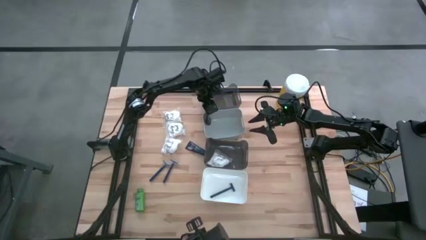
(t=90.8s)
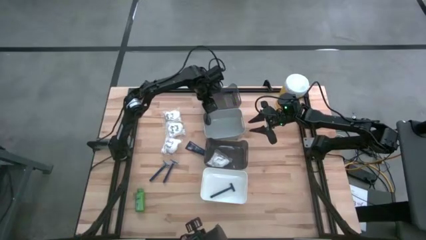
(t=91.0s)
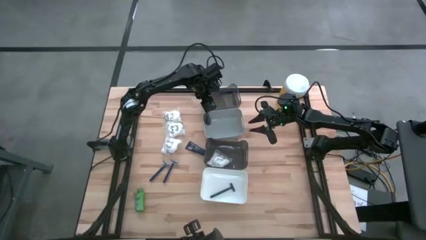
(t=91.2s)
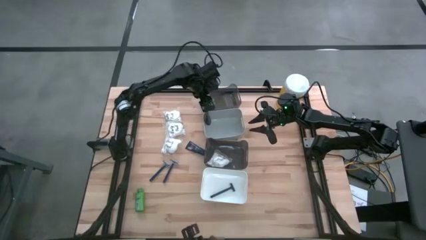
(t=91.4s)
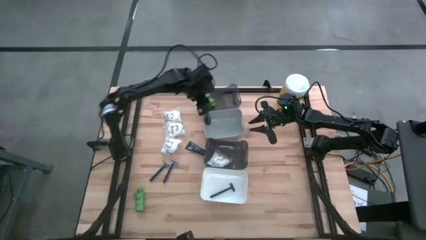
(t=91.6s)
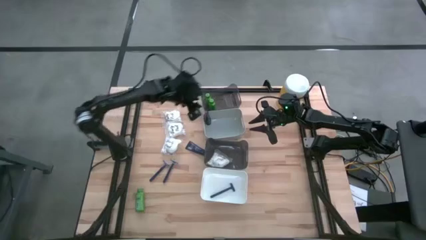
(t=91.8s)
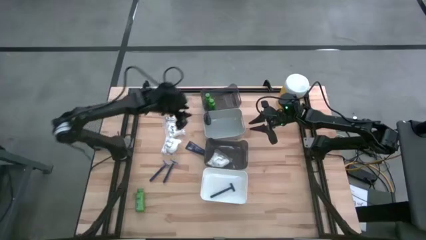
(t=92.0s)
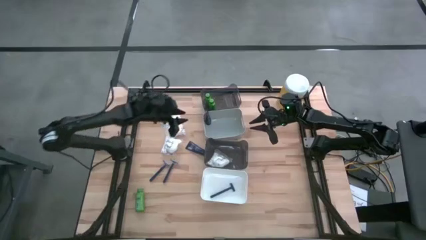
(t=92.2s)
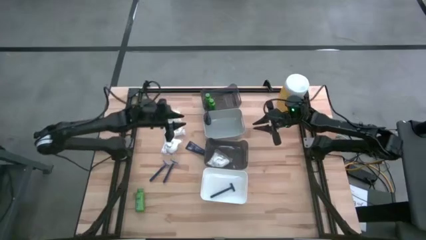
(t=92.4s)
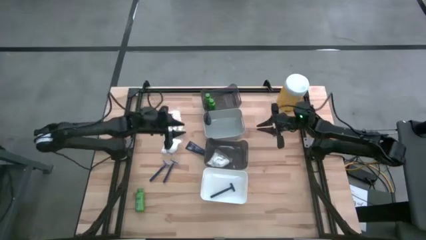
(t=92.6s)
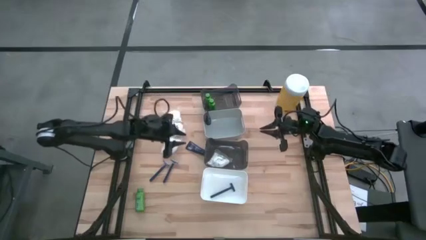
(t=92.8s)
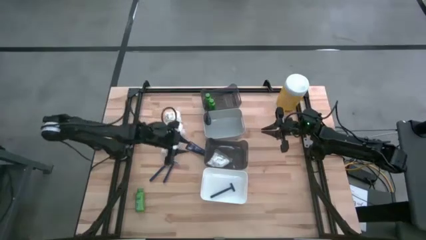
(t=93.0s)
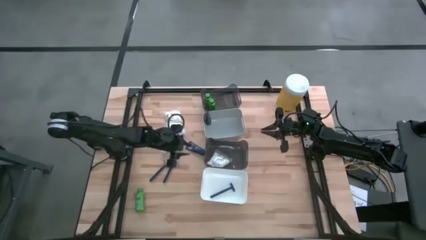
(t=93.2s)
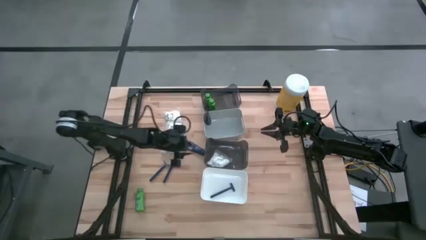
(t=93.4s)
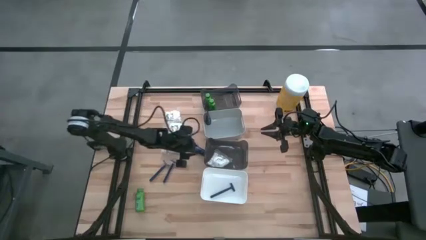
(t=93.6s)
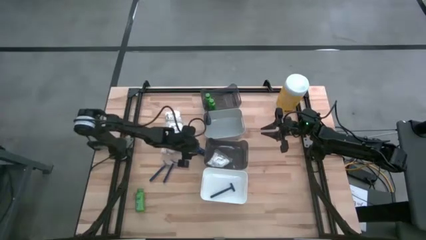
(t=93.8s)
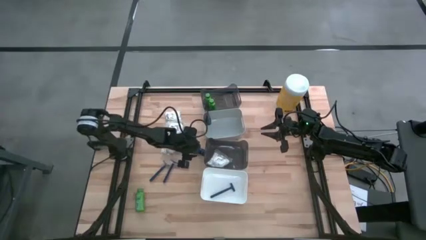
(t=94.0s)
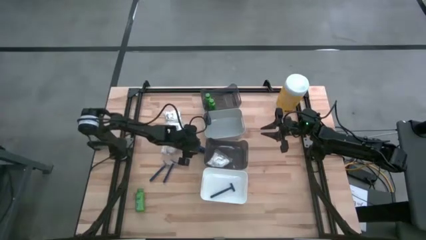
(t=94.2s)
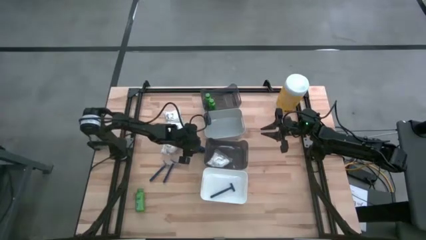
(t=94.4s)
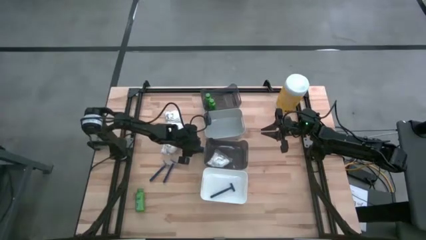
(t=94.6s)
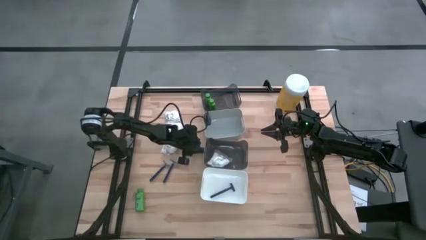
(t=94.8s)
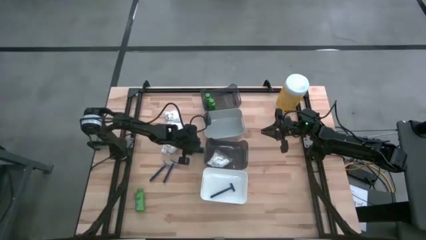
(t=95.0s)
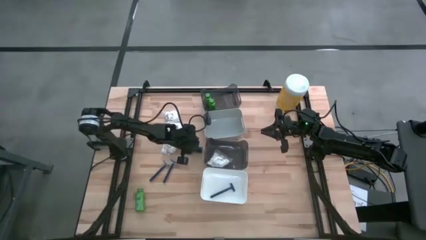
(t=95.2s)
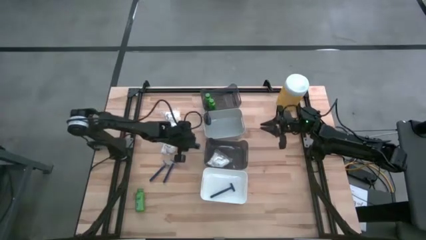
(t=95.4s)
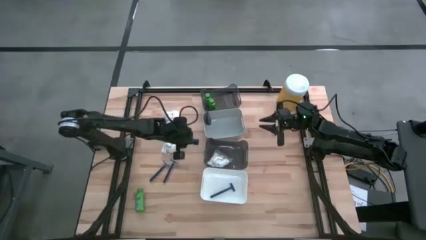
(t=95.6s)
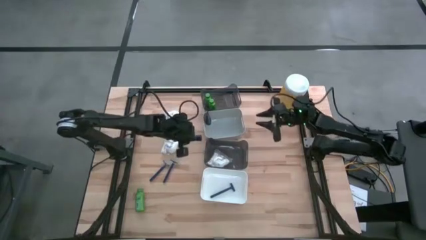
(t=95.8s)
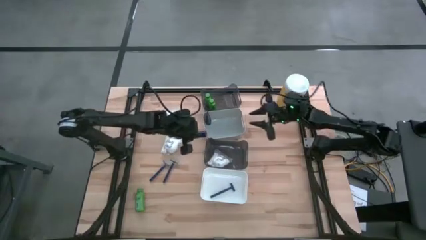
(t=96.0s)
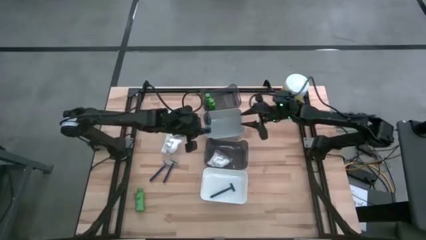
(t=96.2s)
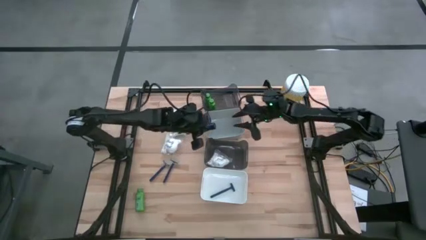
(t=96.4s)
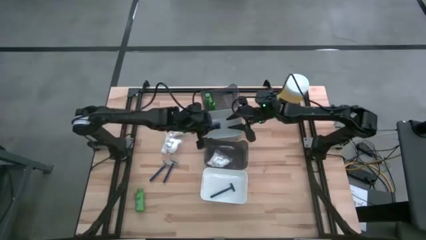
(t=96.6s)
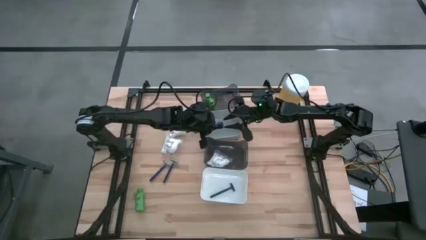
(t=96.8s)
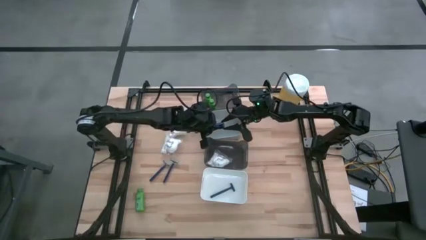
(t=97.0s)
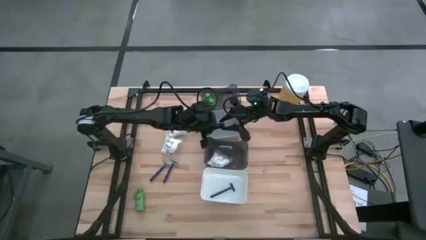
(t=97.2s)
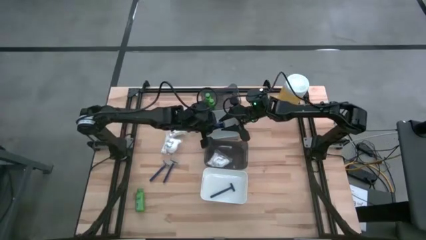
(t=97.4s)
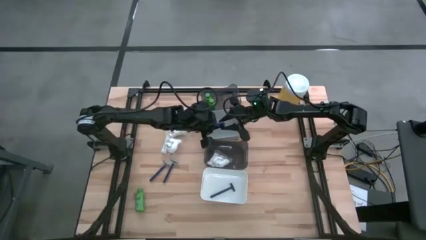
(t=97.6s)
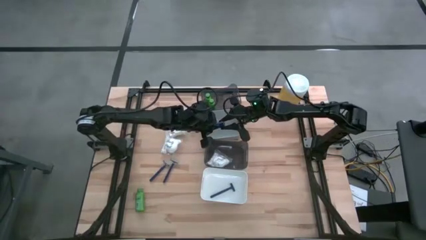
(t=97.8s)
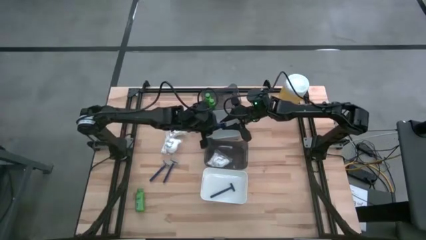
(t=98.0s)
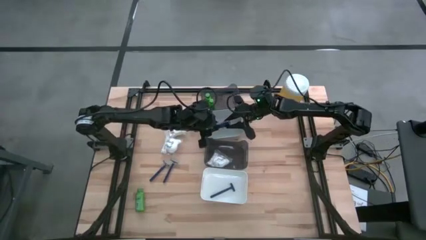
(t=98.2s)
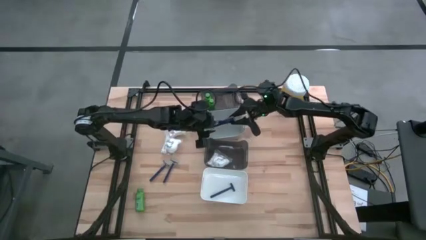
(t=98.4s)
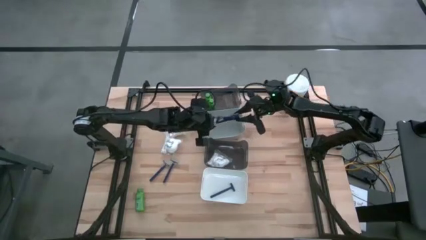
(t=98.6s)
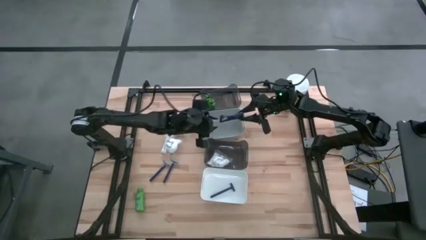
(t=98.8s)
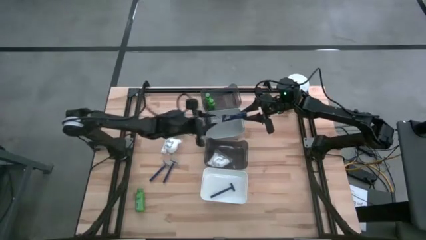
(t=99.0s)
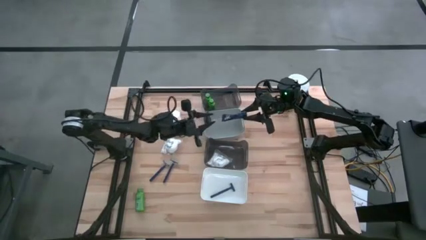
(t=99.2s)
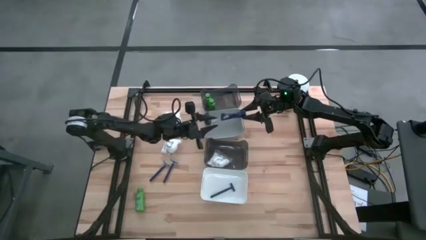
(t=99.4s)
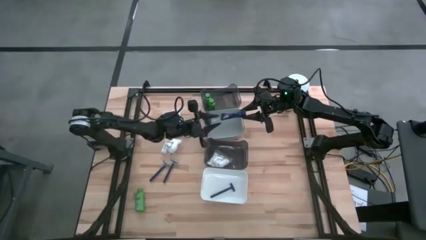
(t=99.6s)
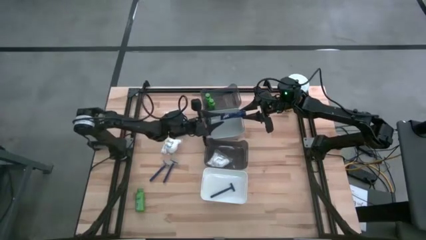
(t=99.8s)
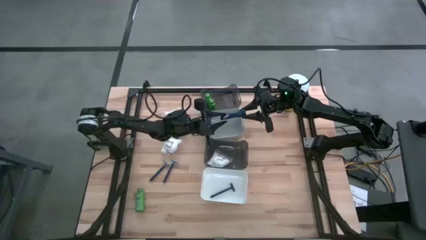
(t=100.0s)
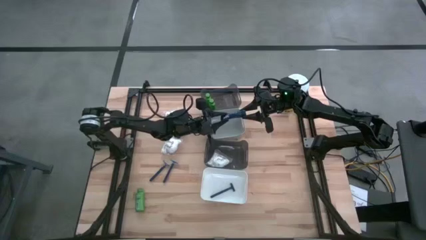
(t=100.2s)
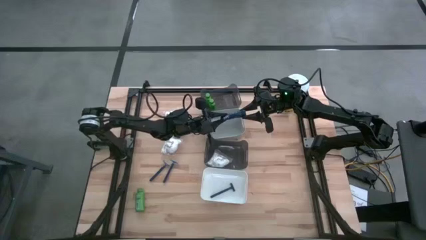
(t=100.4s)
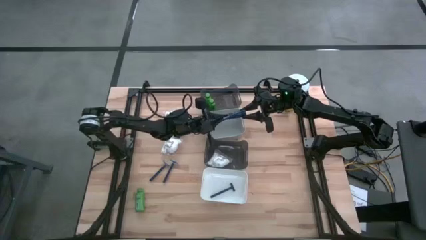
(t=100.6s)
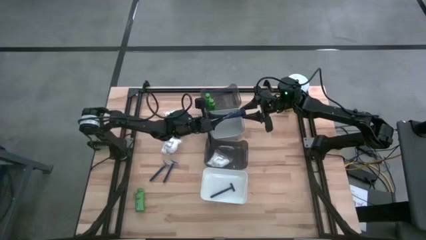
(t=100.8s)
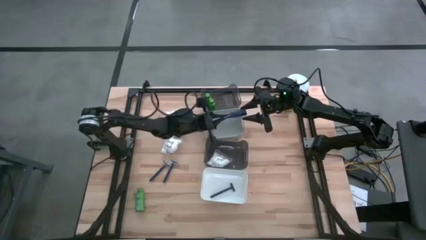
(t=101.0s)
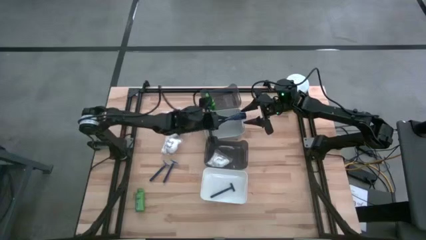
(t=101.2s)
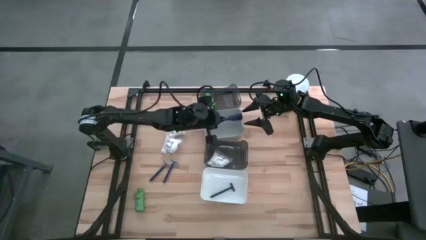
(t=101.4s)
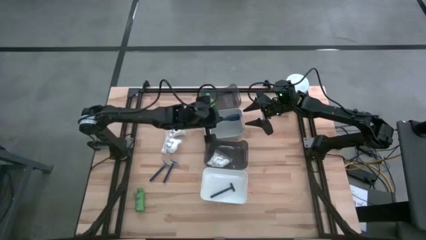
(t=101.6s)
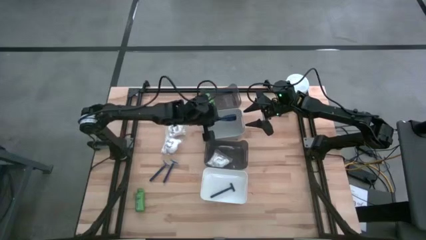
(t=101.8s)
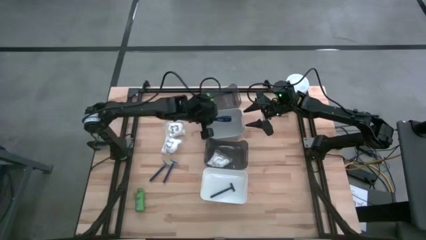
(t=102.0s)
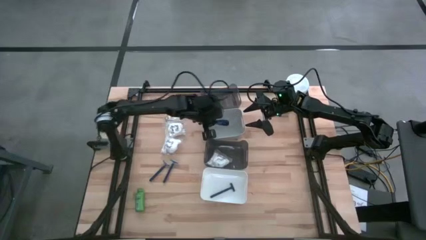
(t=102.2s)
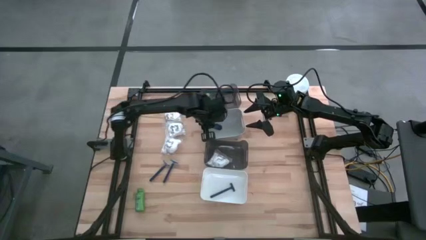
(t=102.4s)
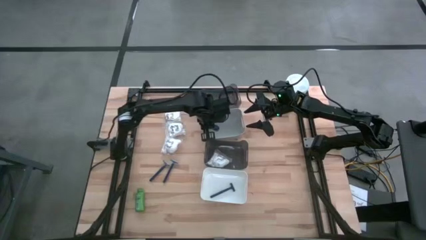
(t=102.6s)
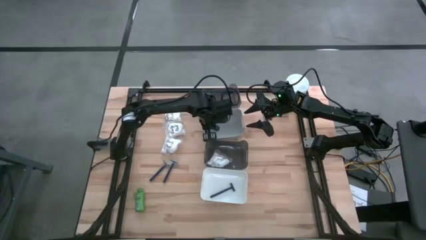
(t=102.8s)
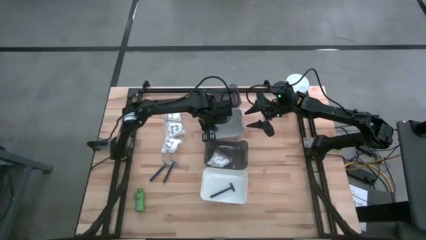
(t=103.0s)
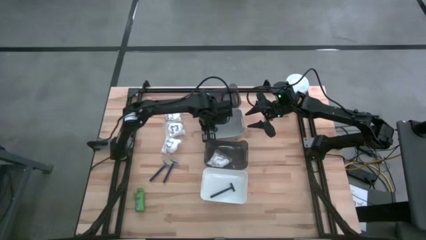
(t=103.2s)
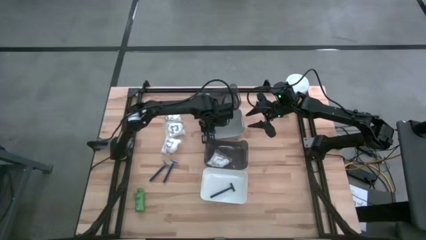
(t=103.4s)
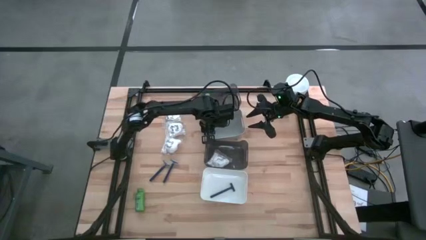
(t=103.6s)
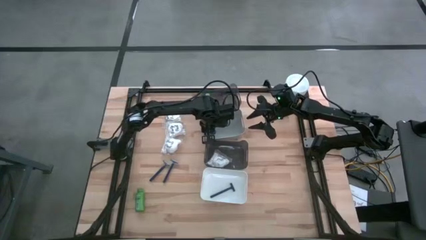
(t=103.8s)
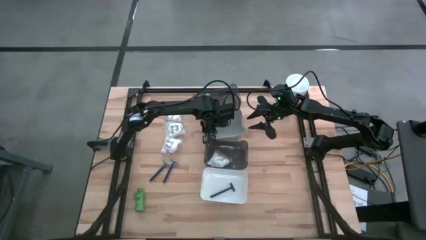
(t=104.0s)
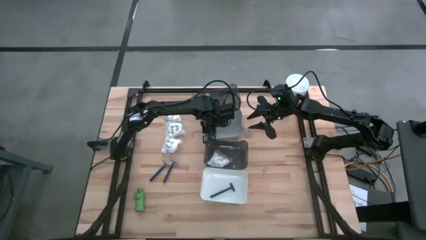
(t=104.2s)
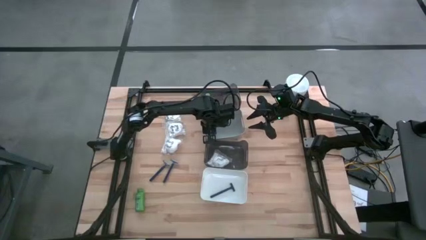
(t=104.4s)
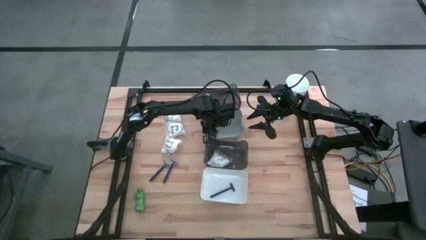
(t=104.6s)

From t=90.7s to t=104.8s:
Task: Pick & Place Travel size toiletries
Put the blue shave cream into the gray bin

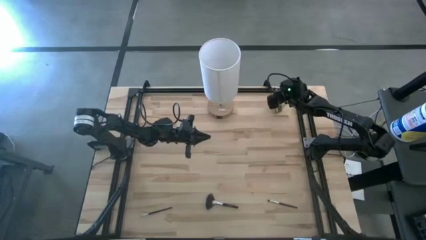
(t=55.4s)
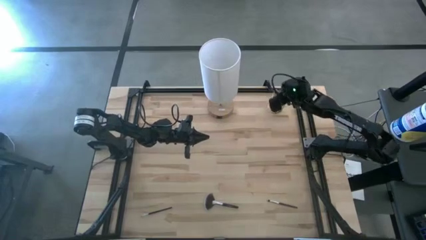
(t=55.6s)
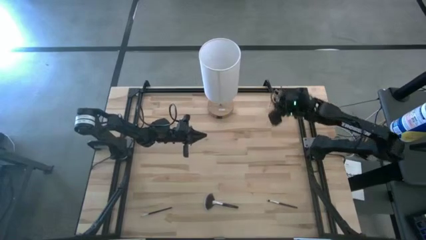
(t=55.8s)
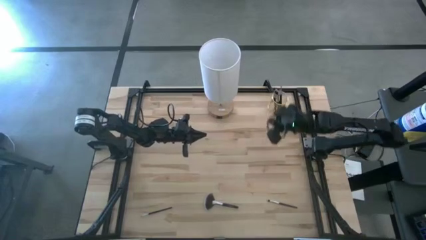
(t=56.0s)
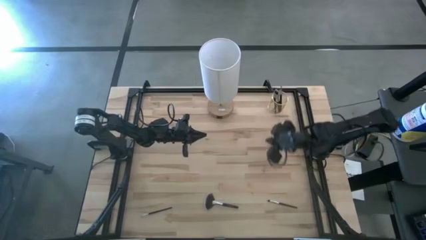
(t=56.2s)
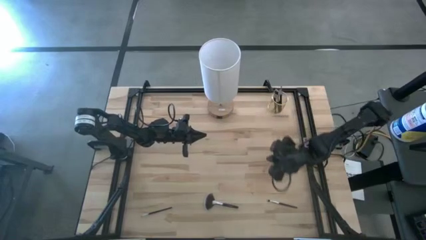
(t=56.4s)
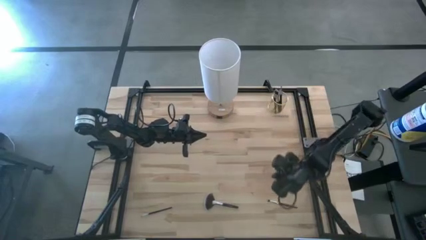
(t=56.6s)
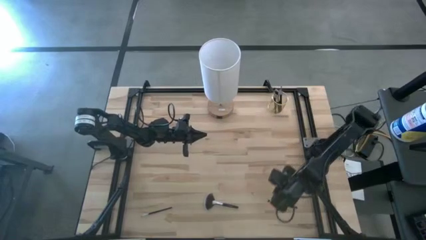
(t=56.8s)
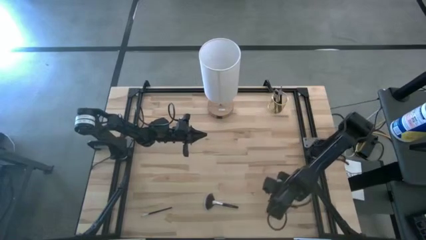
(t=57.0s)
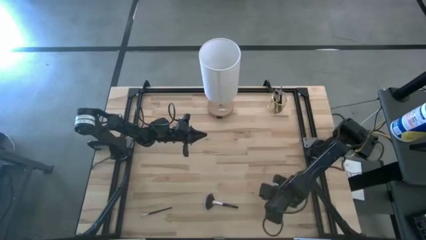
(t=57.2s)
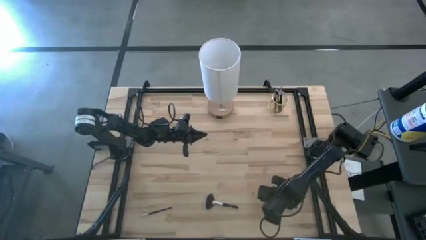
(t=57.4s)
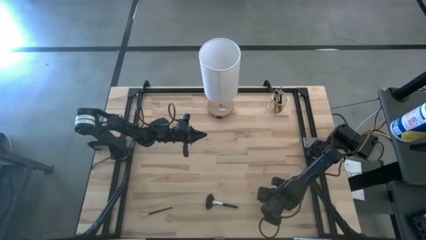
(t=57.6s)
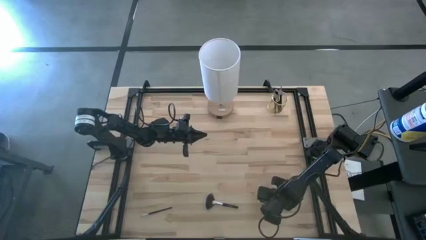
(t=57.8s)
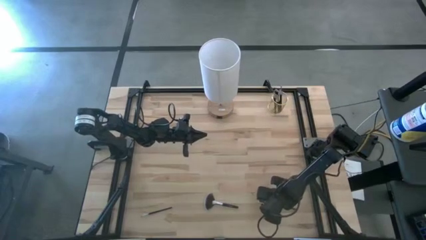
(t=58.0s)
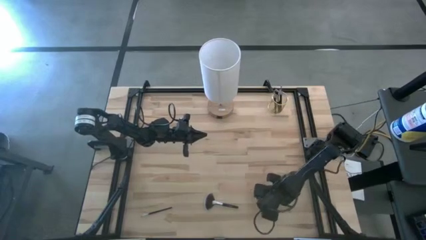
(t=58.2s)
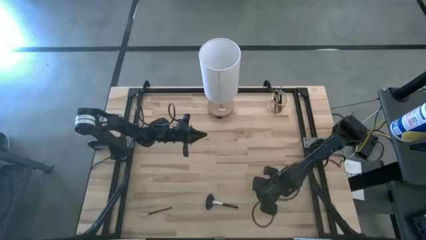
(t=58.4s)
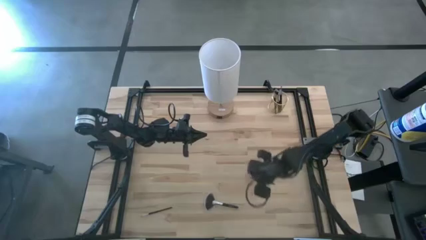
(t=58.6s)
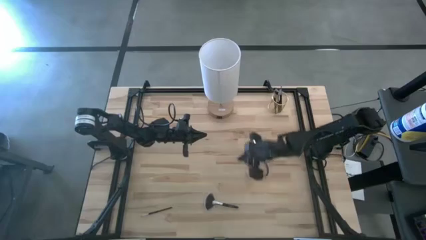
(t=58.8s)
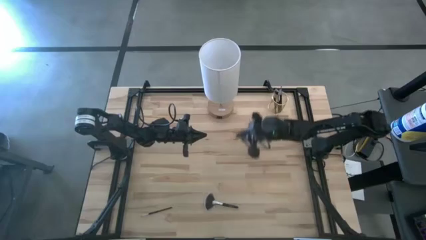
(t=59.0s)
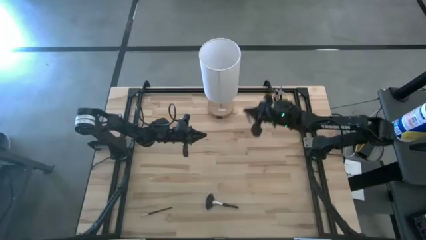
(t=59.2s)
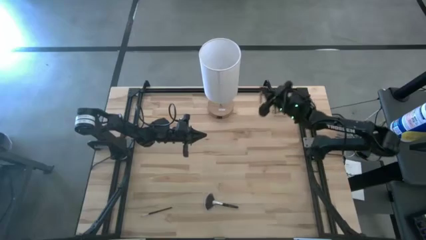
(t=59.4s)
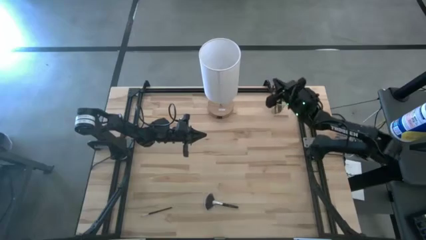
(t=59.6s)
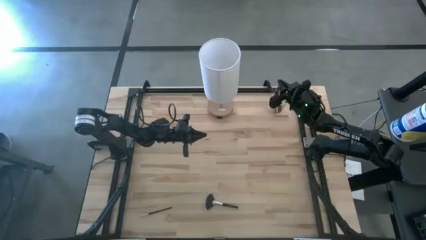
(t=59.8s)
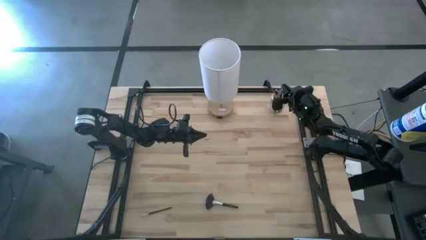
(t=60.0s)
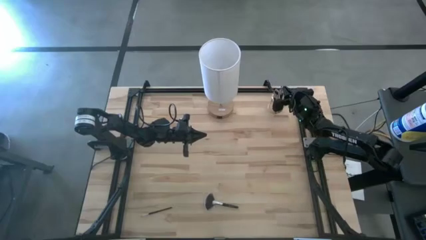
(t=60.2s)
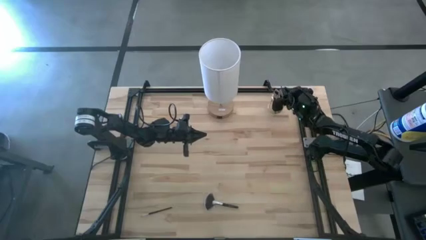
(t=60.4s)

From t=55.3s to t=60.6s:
Task: Pick & Place Makeup Brushes
Put the eyeshadow brush into the makeup brush holder
